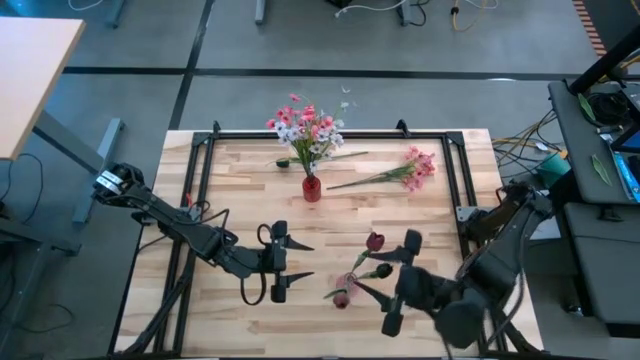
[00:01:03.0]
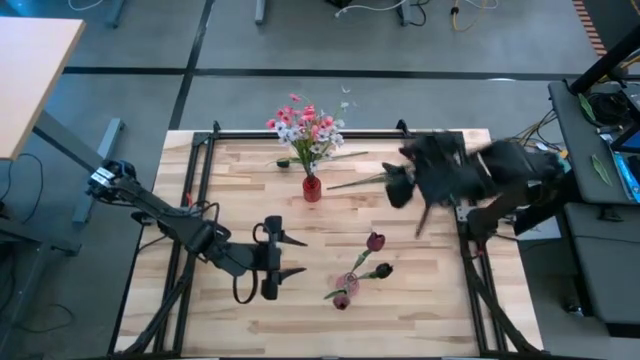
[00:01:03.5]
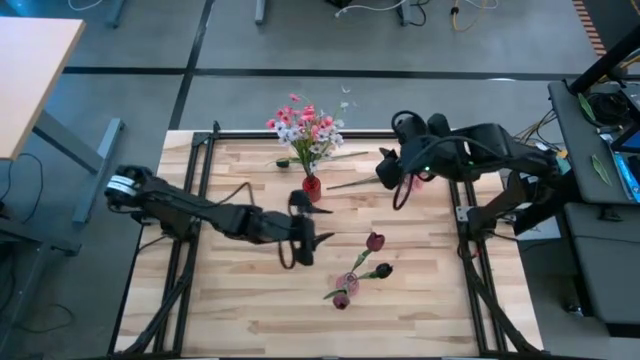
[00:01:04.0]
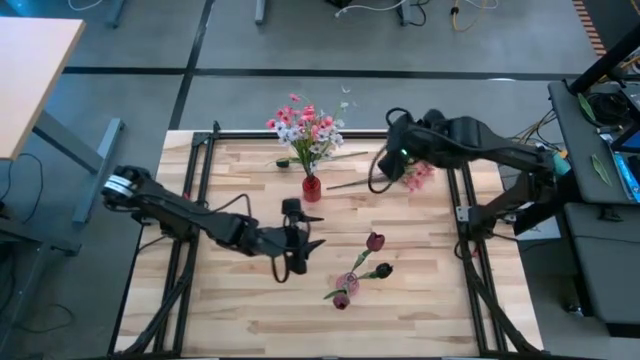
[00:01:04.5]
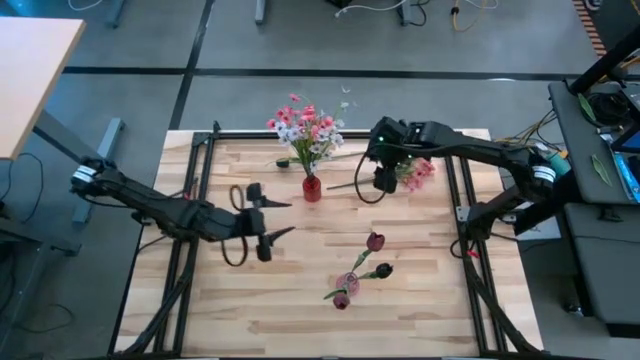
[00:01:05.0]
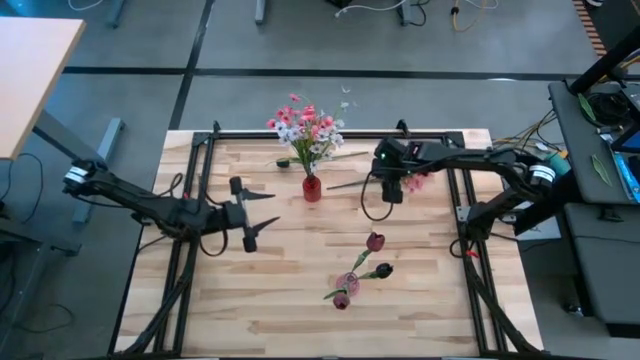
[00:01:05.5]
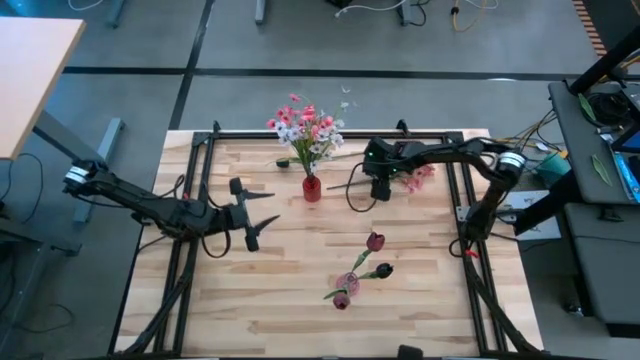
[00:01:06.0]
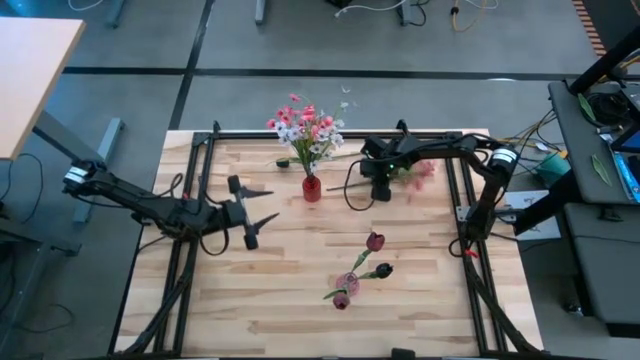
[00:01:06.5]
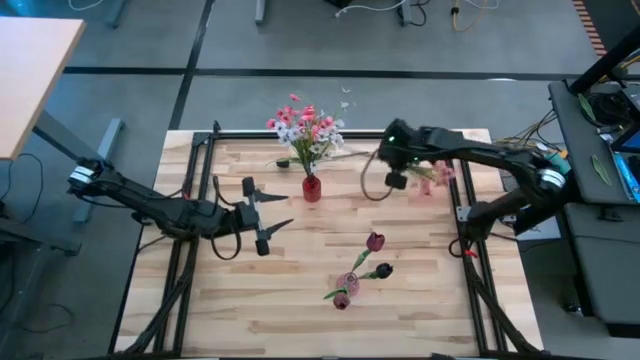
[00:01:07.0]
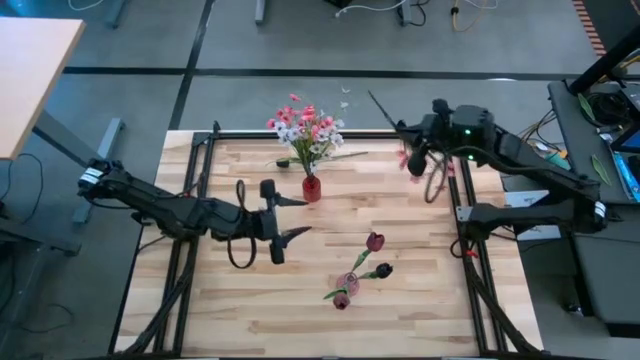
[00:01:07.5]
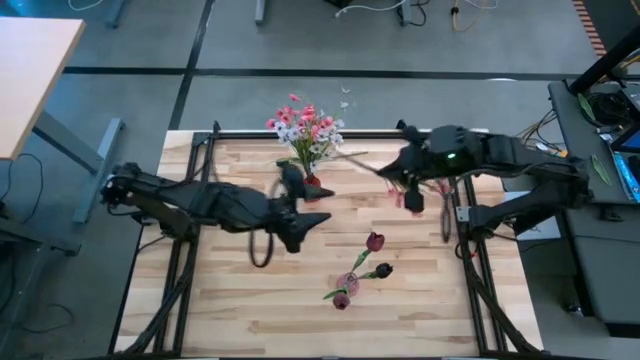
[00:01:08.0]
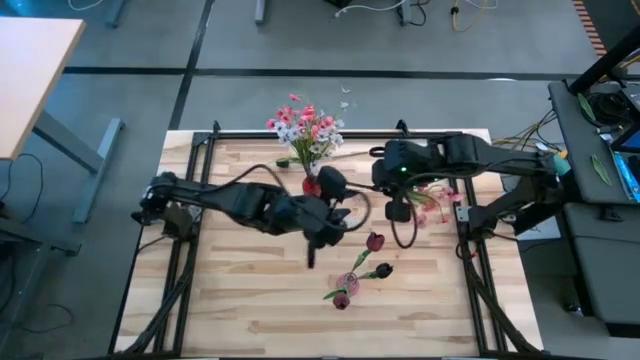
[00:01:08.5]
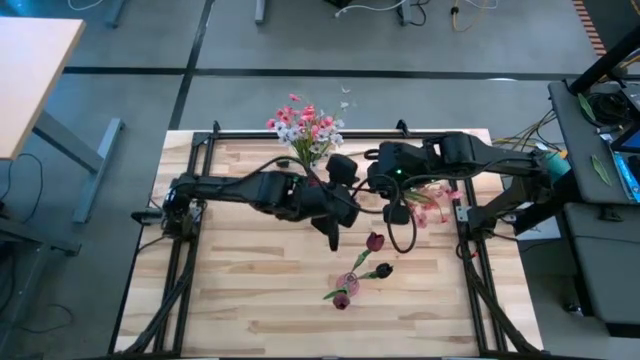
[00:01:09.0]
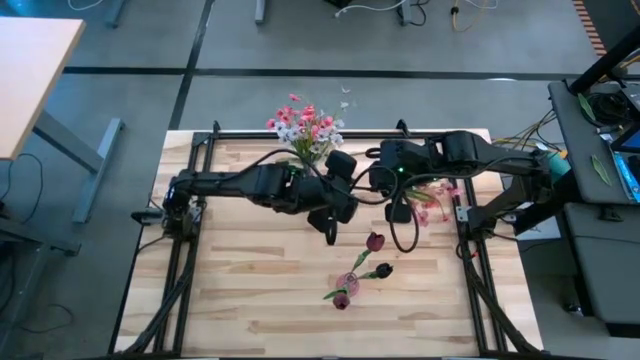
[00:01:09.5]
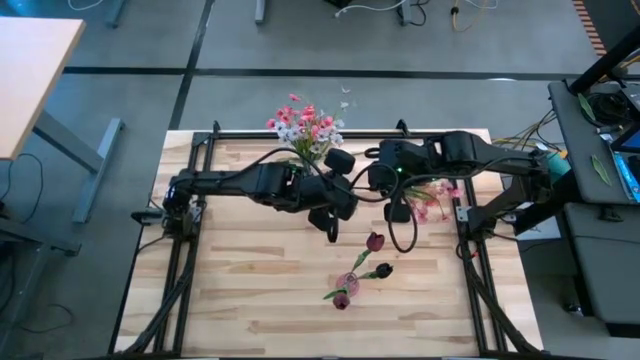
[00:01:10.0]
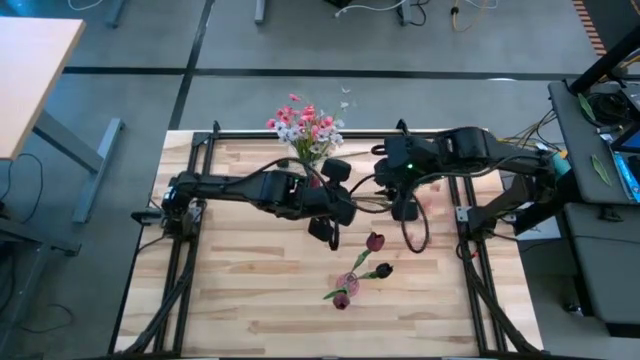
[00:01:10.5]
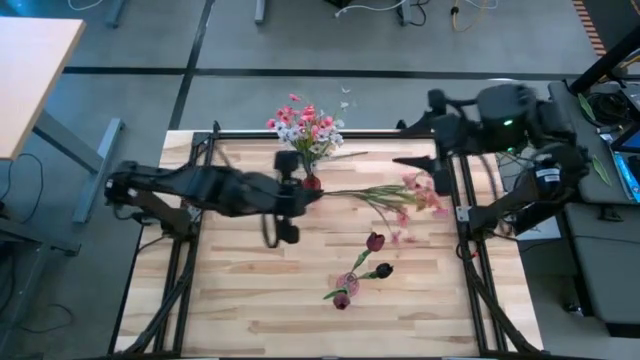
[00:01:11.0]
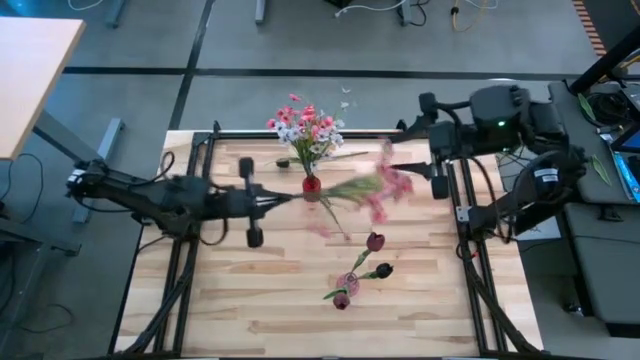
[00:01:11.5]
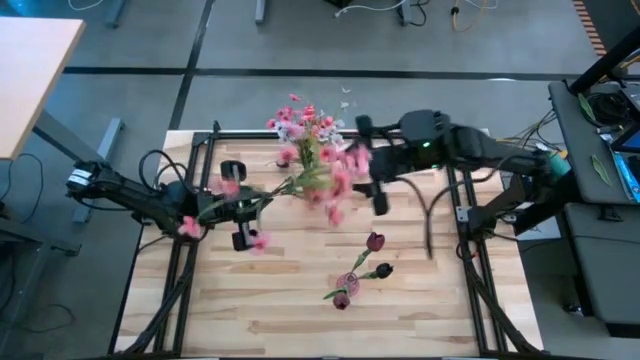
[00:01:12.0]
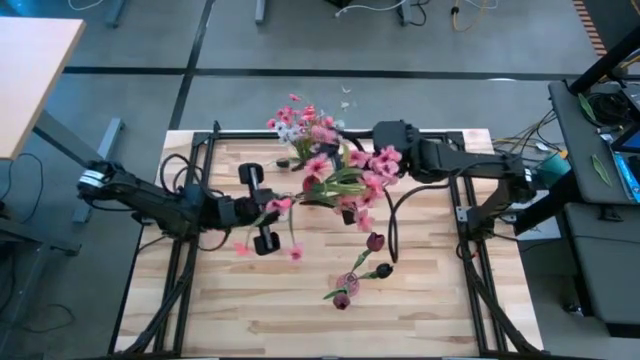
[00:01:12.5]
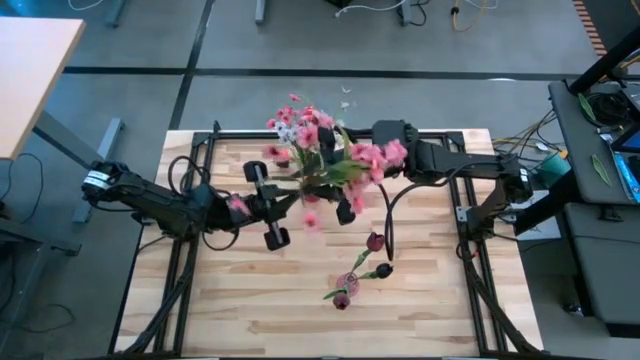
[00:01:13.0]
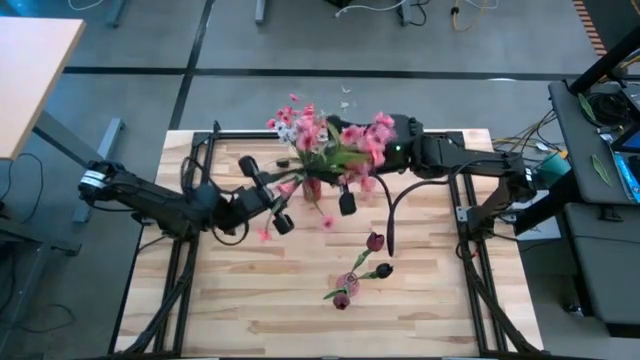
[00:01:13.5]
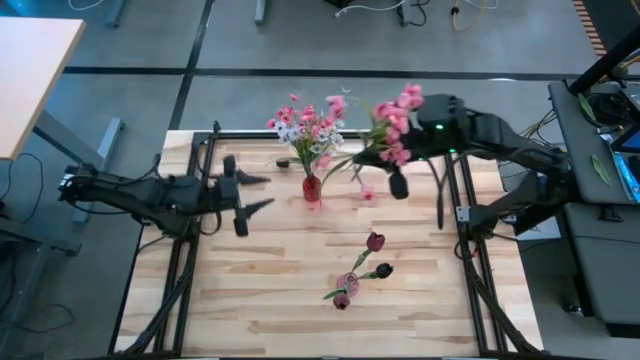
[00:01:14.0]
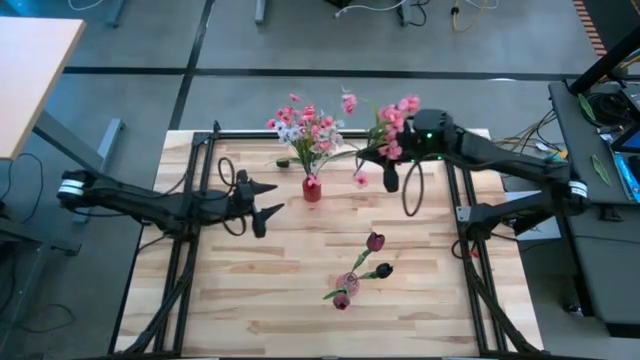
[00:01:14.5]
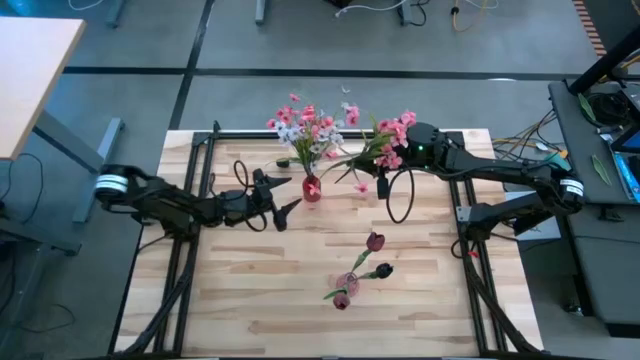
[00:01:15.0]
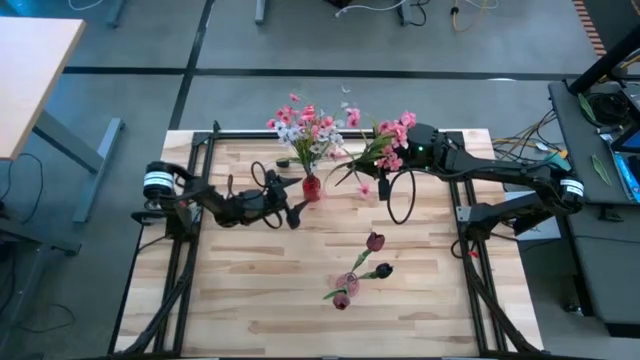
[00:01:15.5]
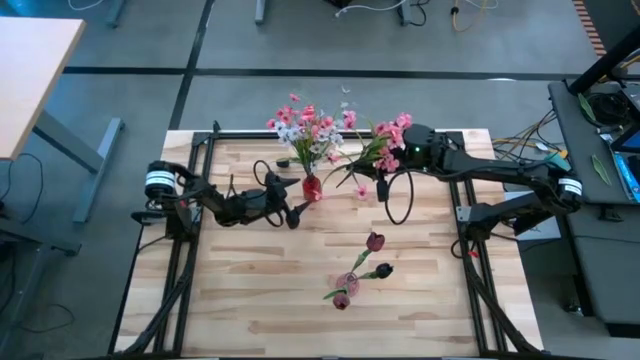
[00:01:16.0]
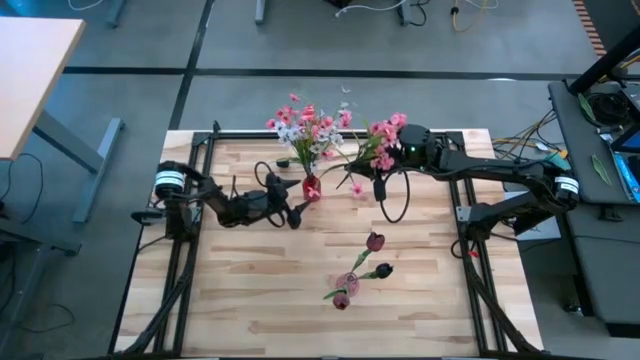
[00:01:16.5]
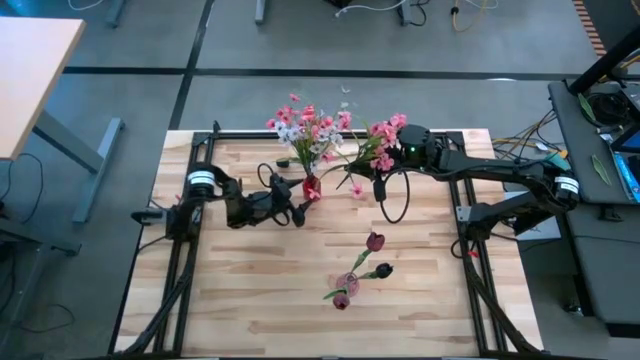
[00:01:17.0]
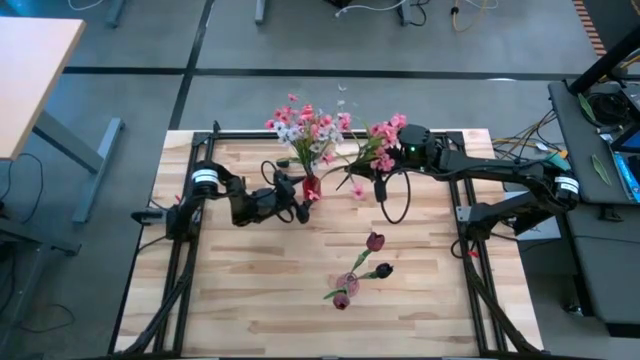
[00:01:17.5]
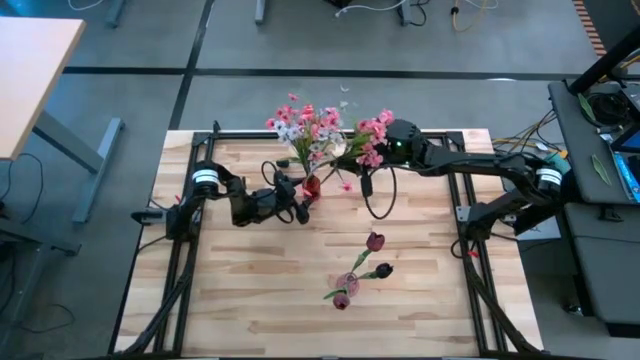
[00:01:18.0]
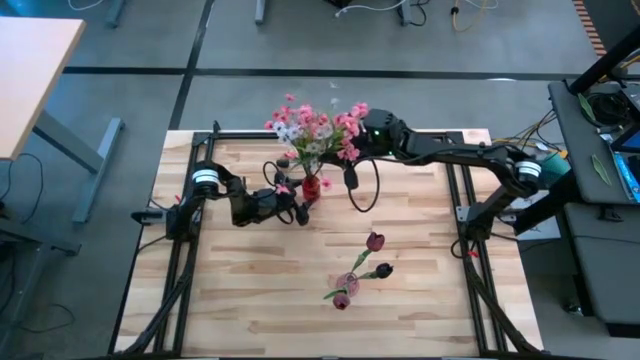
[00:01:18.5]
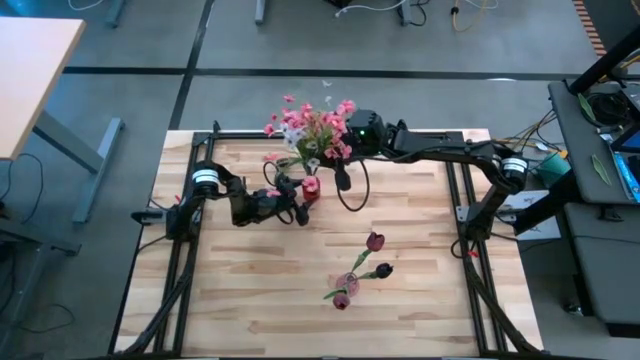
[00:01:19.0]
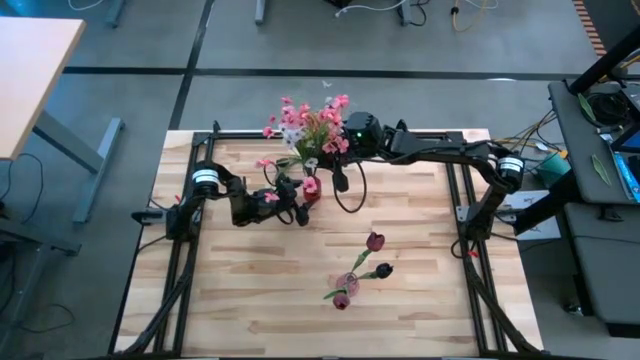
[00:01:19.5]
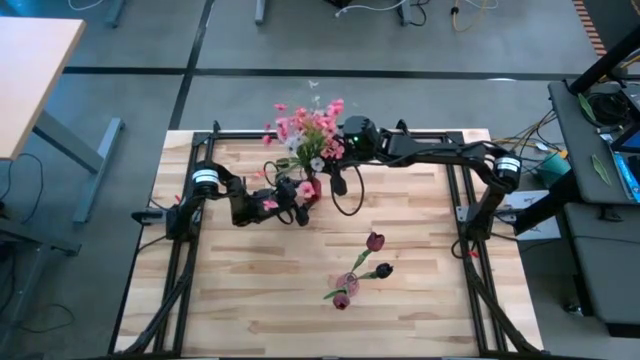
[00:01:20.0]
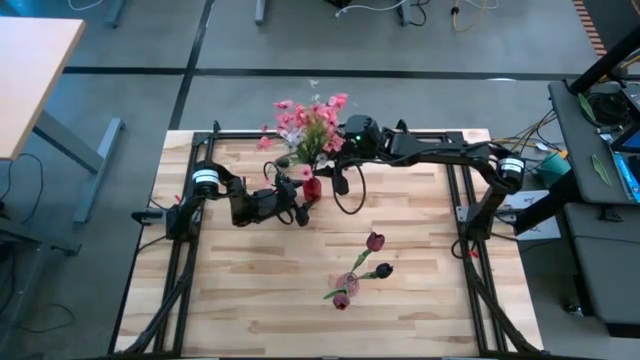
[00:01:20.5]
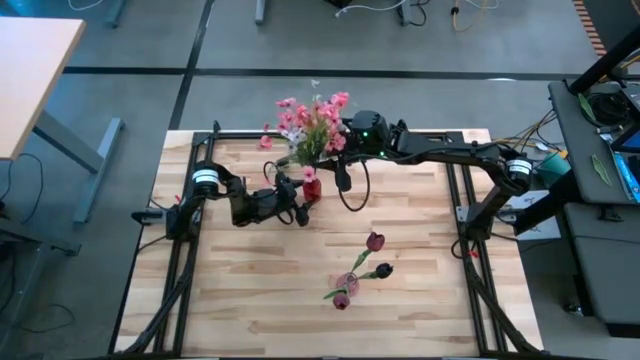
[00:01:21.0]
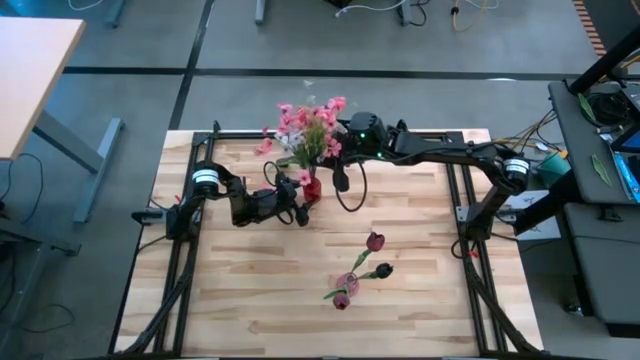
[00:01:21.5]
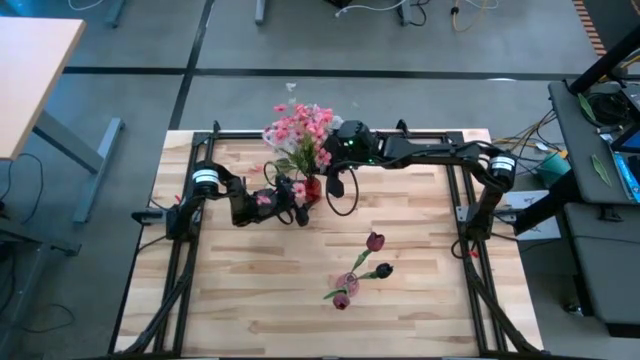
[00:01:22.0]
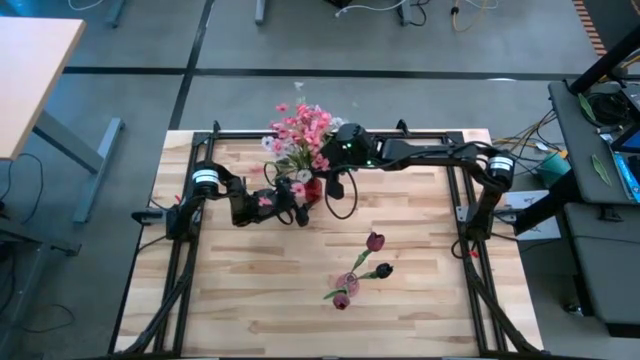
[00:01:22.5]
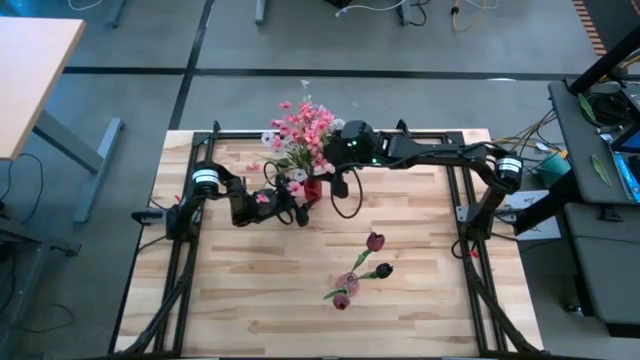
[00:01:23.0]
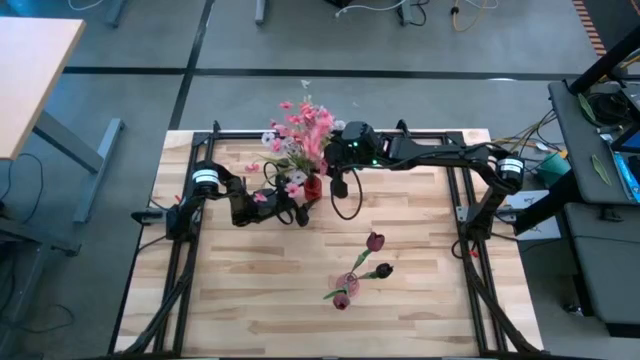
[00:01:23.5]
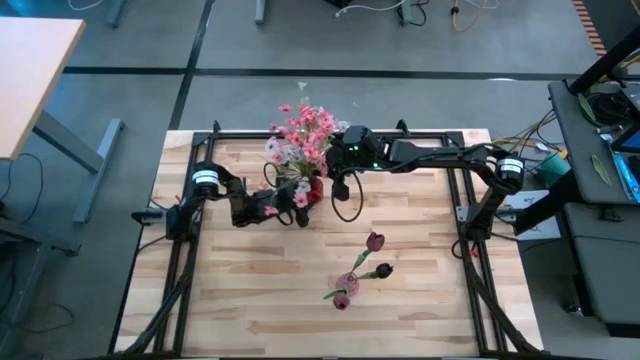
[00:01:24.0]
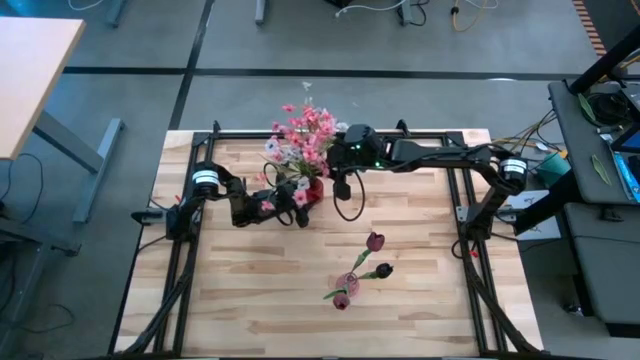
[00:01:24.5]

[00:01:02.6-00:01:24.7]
Task: Sort flowers into vase by color
Put the pink flowers into the red vase
